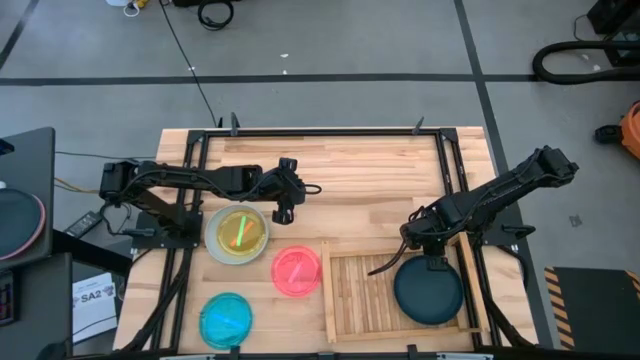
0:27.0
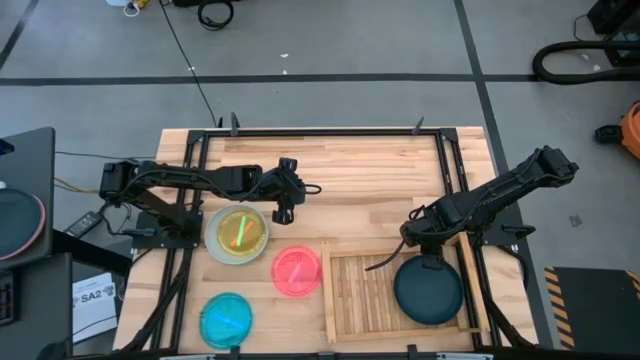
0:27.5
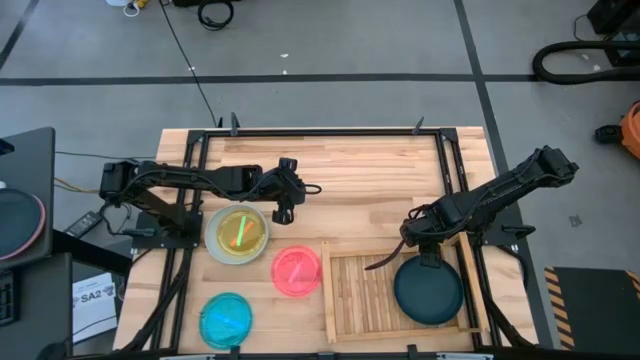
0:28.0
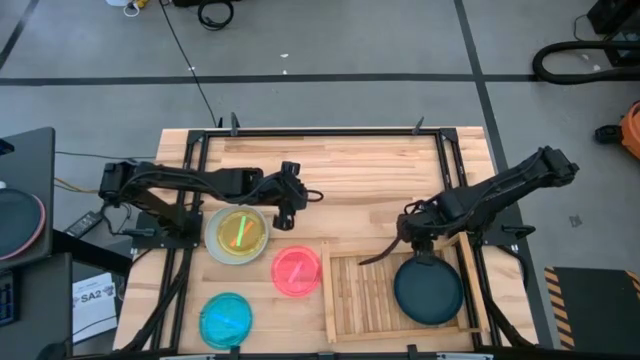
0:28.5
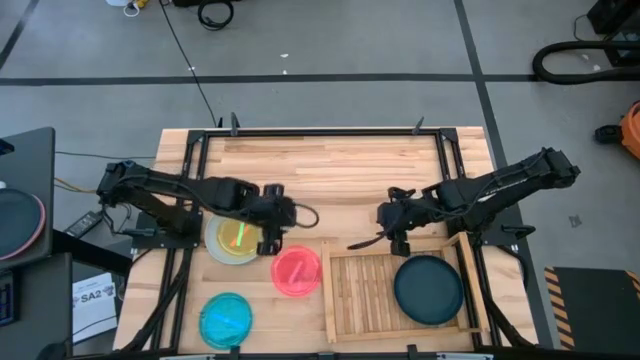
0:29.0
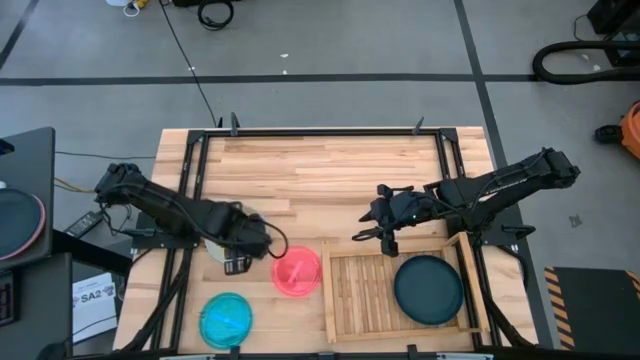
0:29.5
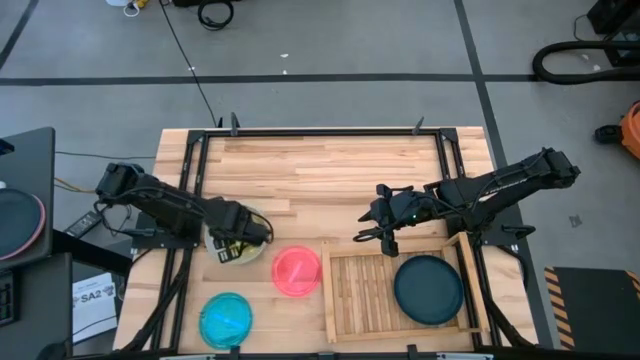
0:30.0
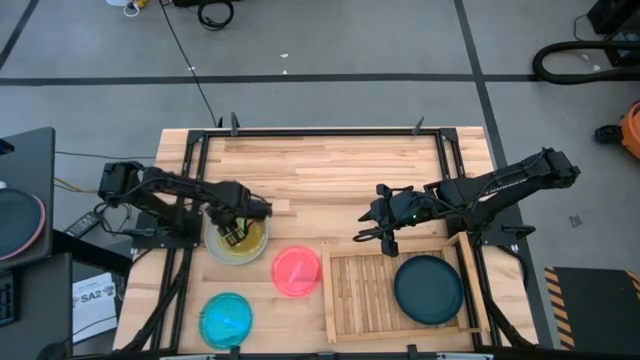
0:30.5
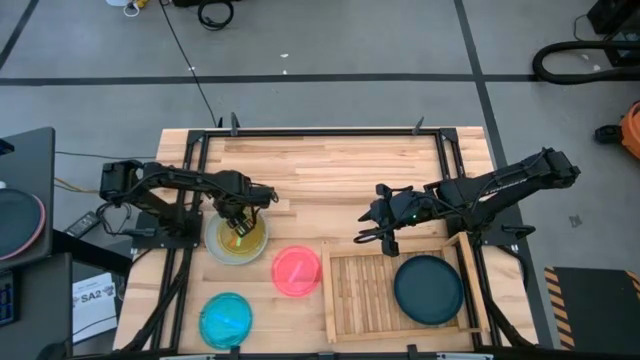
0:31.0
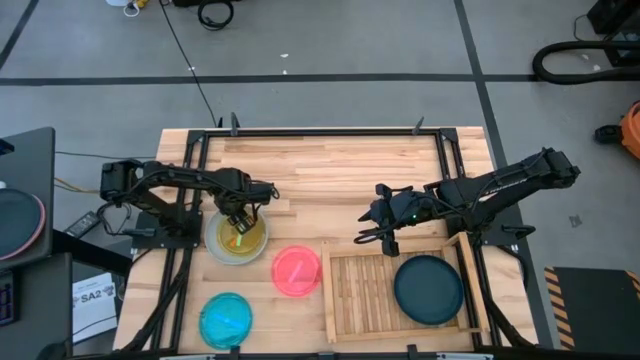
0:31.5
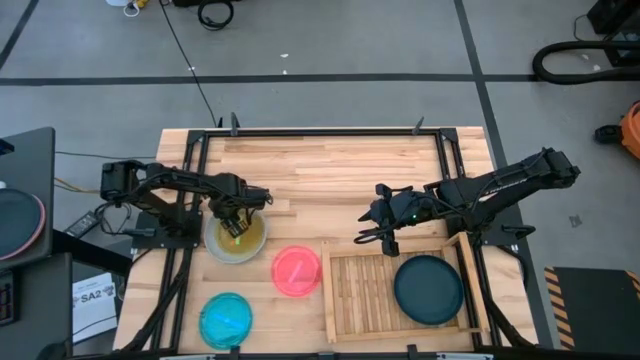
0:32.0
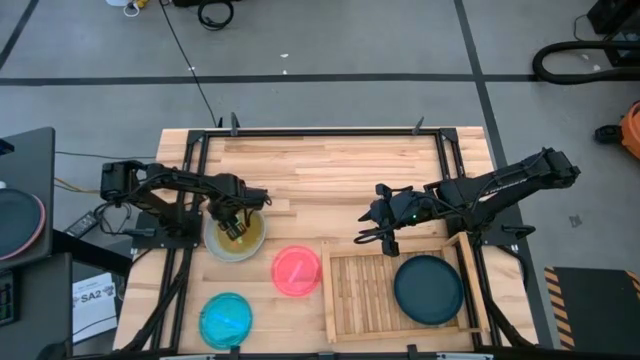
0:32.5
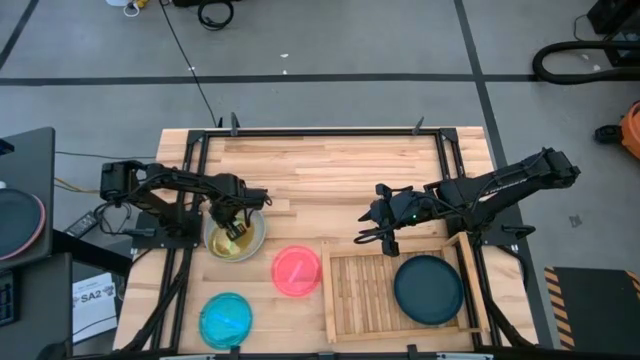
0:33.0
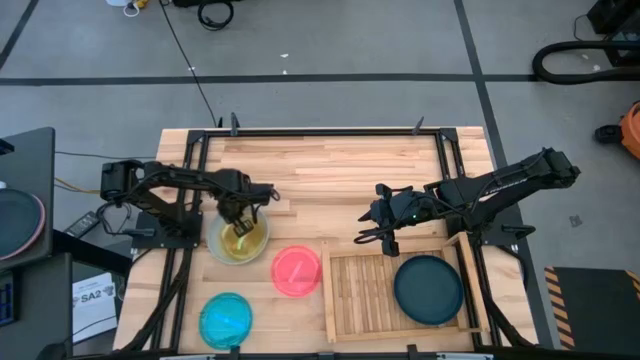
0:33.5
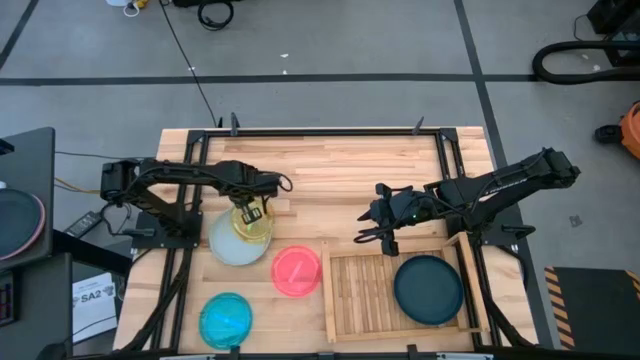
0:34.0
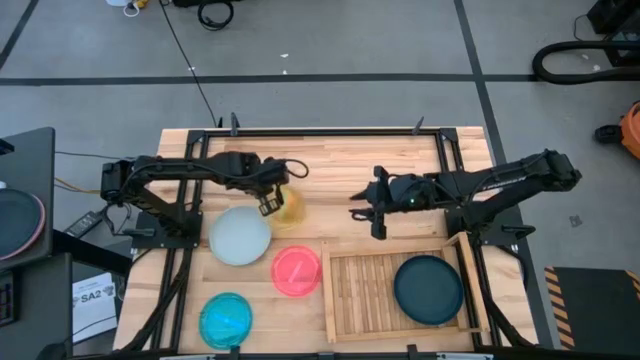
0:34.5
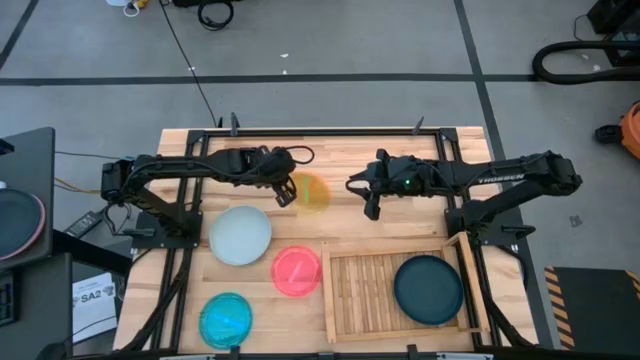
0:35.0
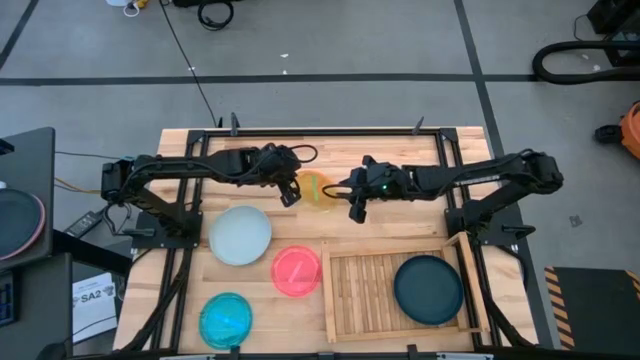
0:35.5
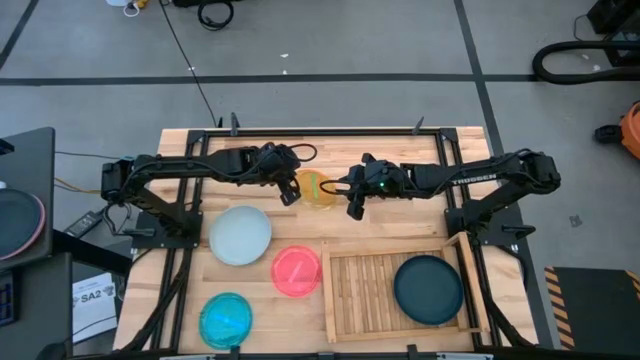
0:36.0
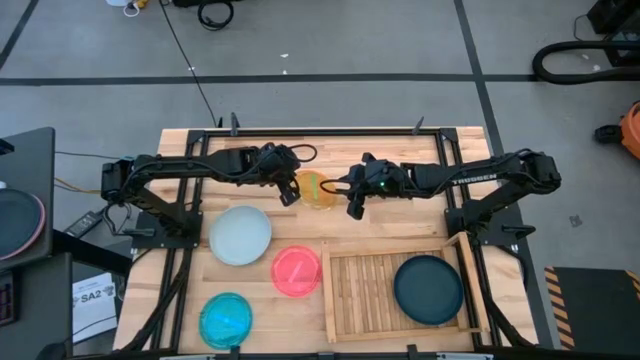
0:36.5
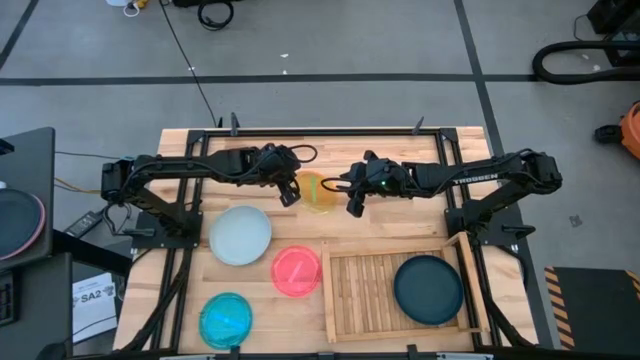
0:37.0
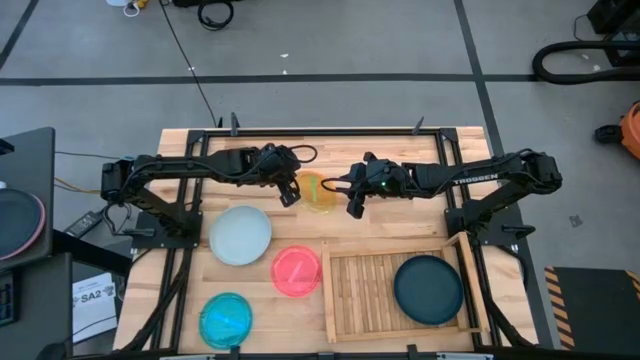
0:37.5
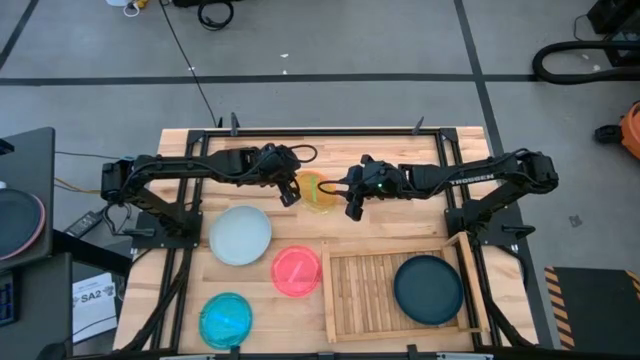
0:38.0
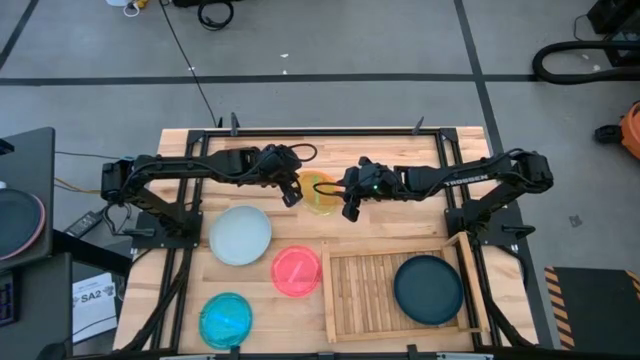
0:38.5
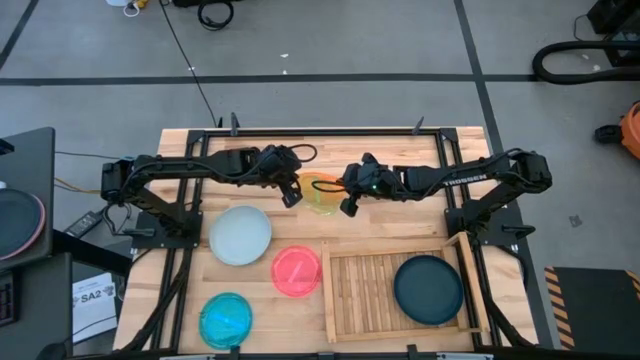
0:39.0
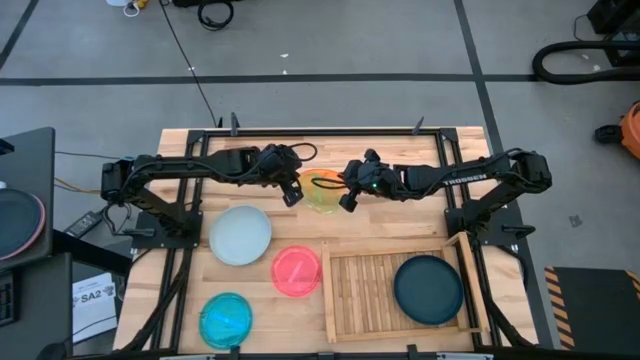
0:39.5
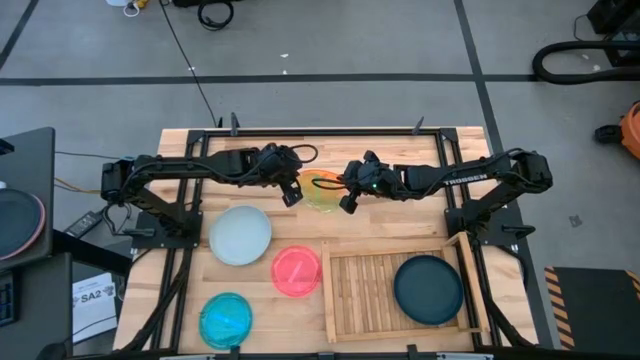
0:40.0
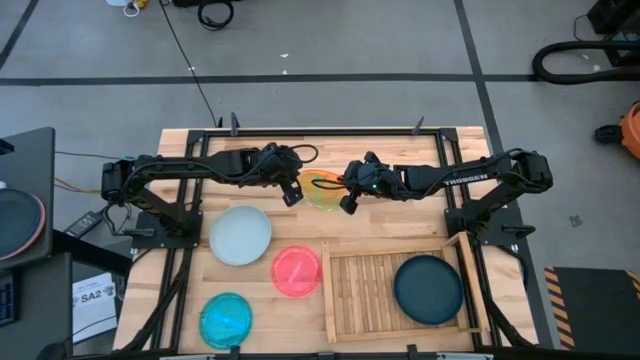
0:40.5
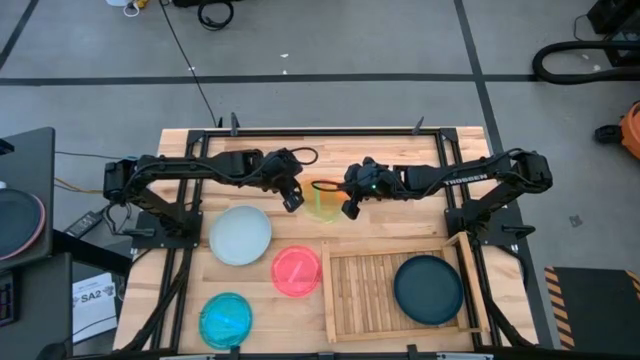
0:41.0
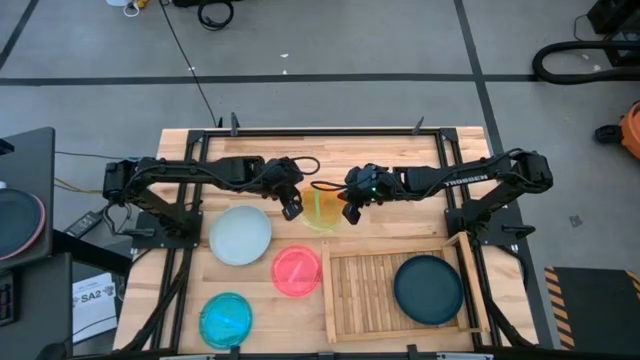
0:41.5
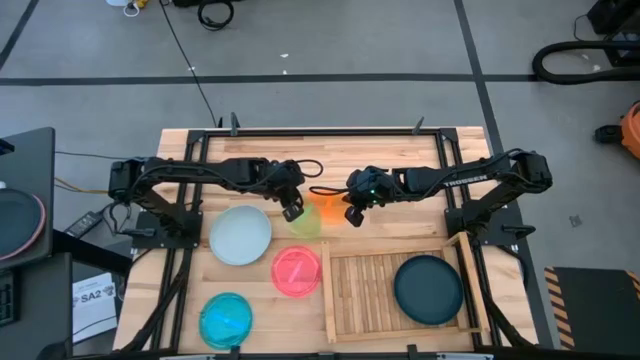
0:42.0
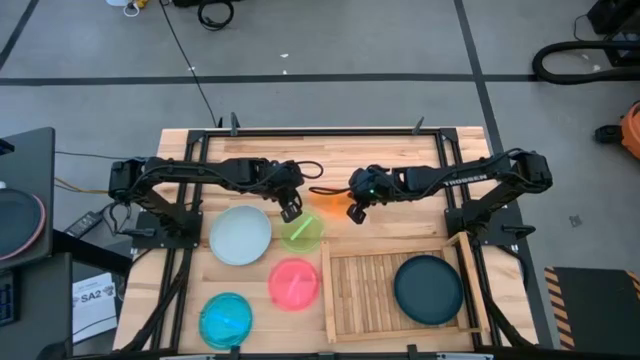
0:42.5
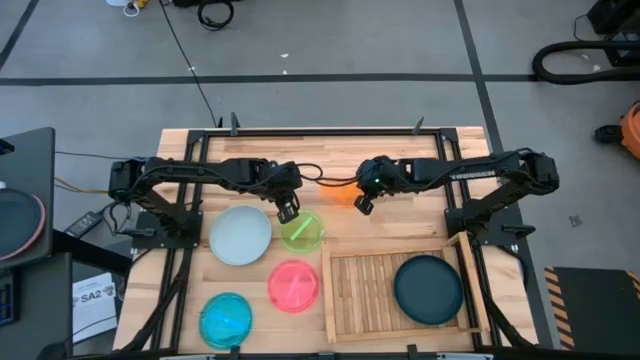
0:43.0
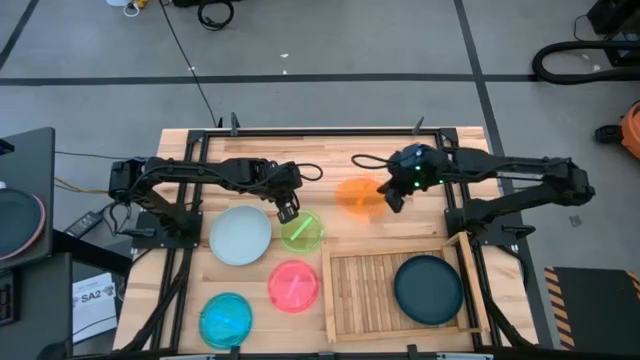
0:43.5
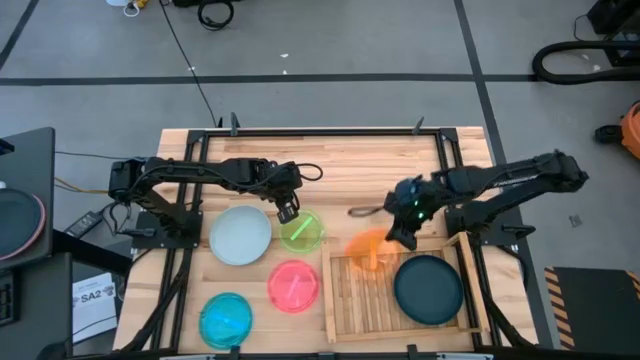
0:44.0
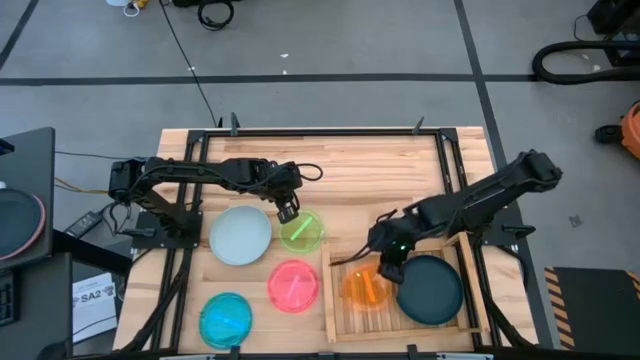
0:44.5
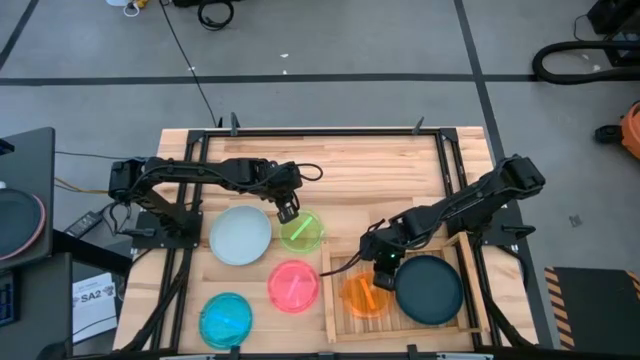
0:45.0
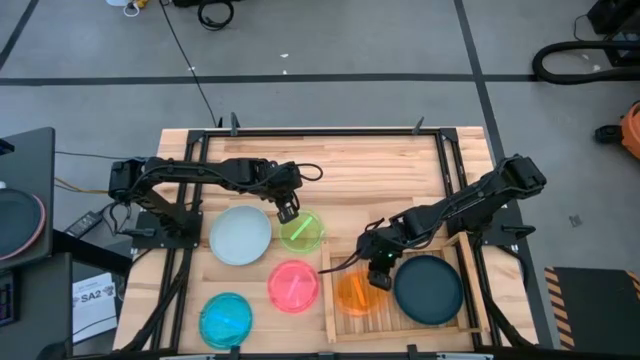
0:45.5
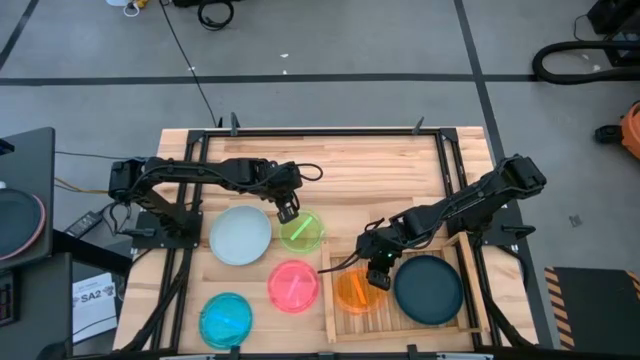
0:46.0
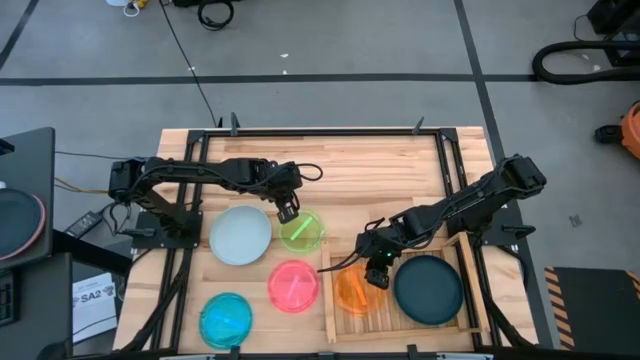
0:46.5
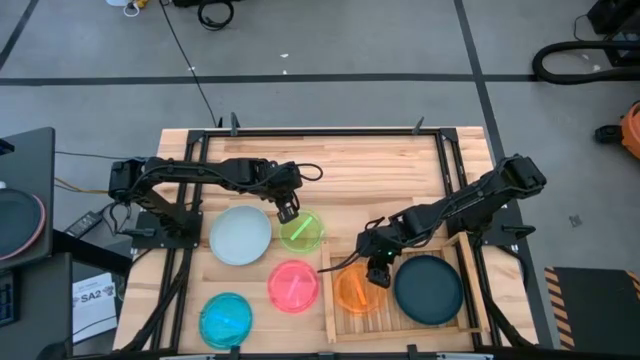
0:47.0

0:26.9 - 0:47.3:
Task: Place and stack plates onto a shelf
Put the orange plate on the shelf

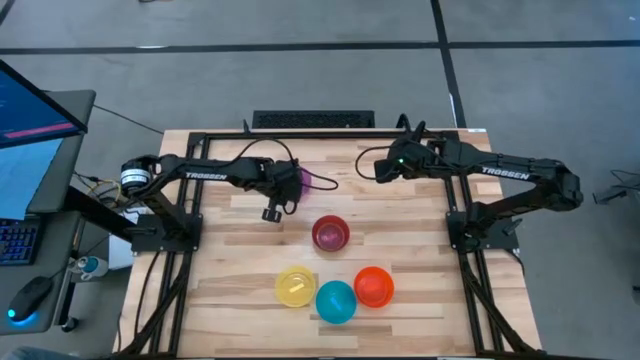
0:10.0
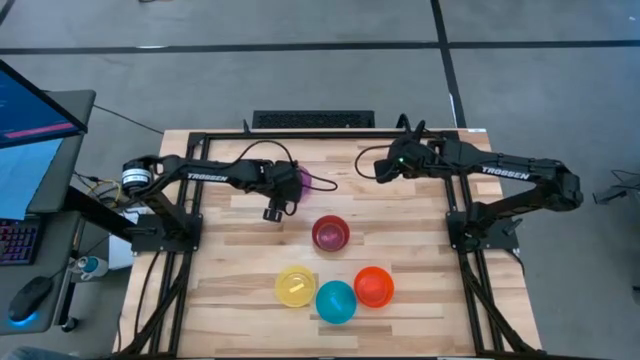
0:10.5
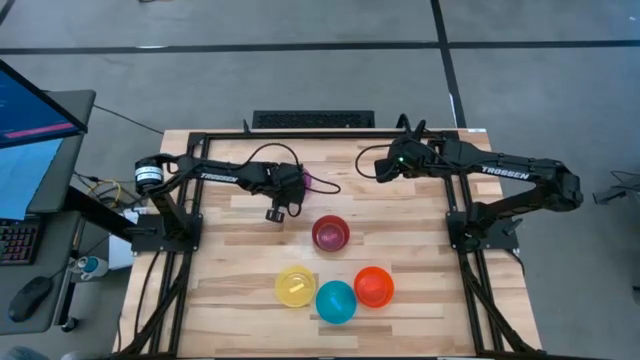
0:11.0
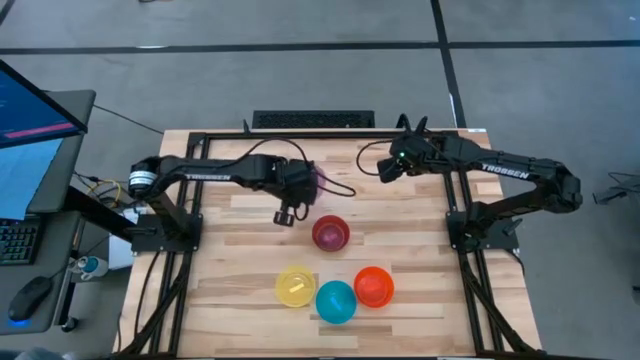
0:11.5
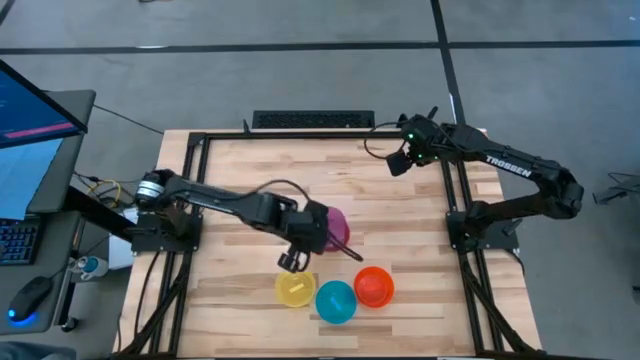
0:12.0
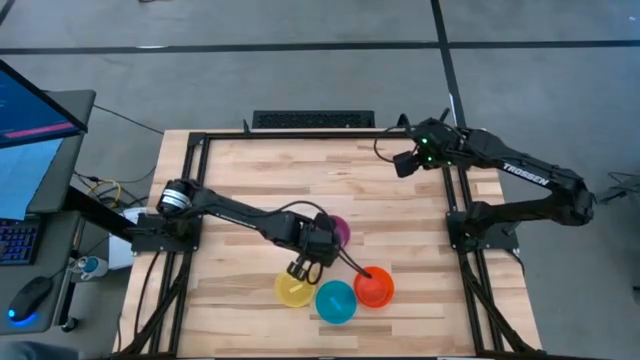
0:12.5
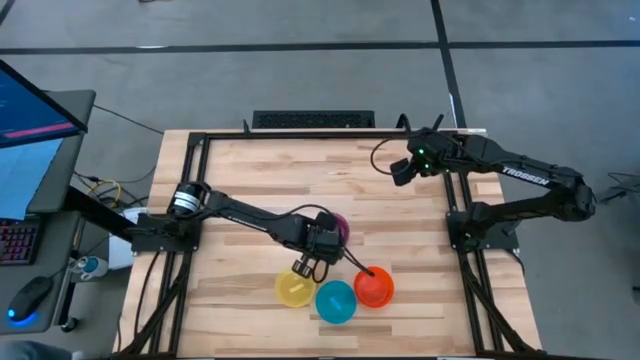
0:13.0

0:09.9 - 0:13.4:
Task: Nest bowls inside each other
Stack the purple bowl on top of the pink bowl
